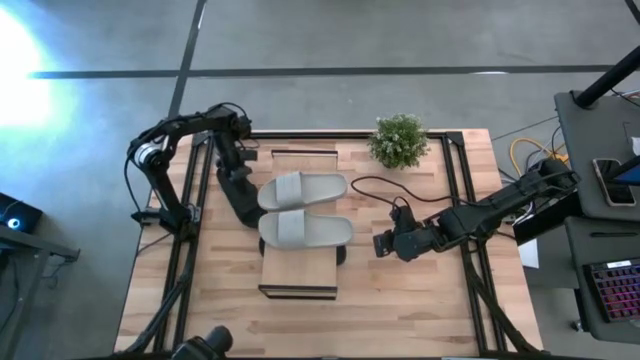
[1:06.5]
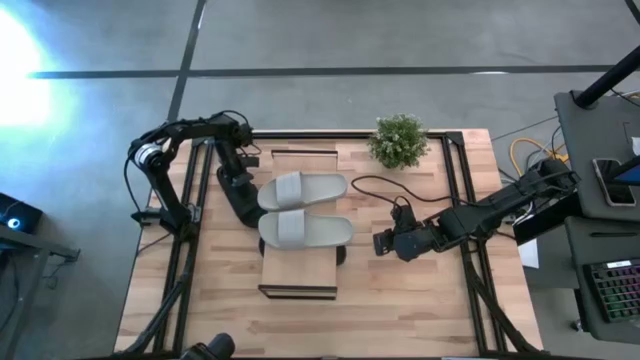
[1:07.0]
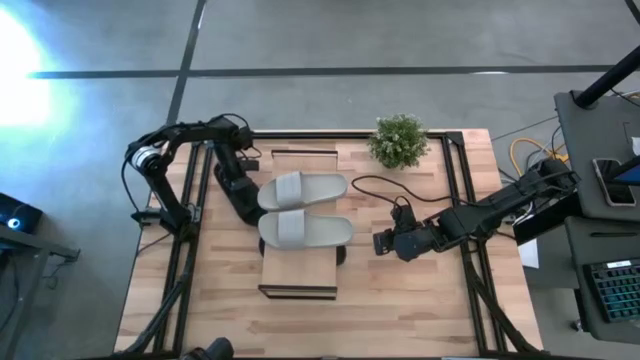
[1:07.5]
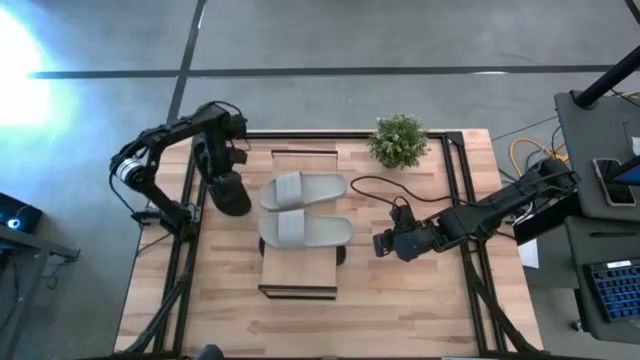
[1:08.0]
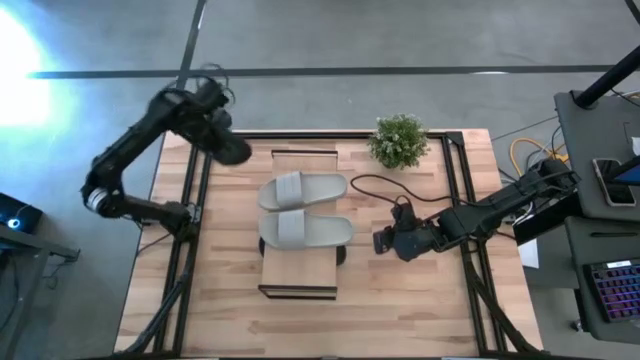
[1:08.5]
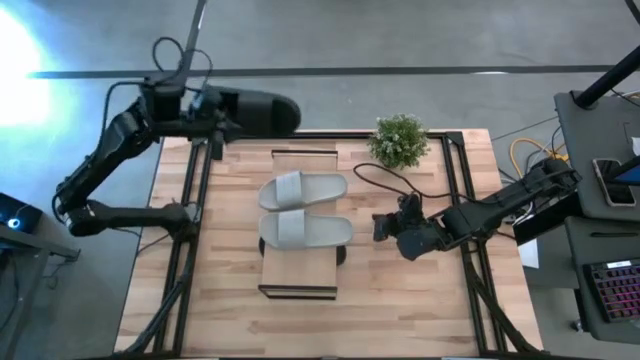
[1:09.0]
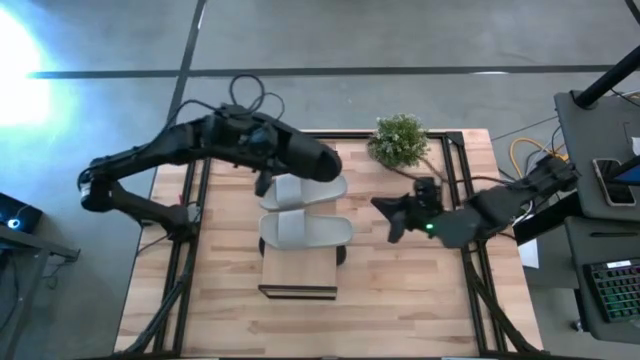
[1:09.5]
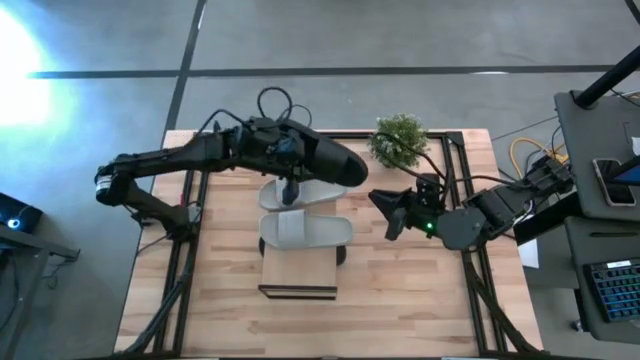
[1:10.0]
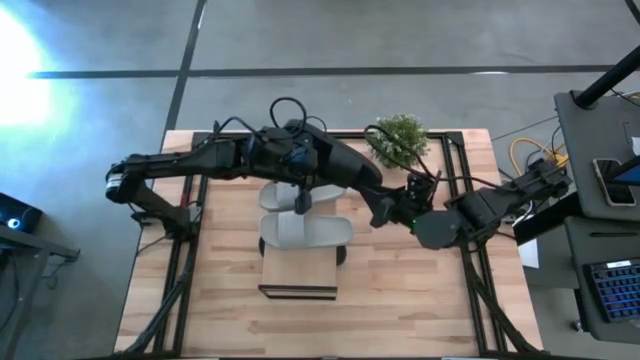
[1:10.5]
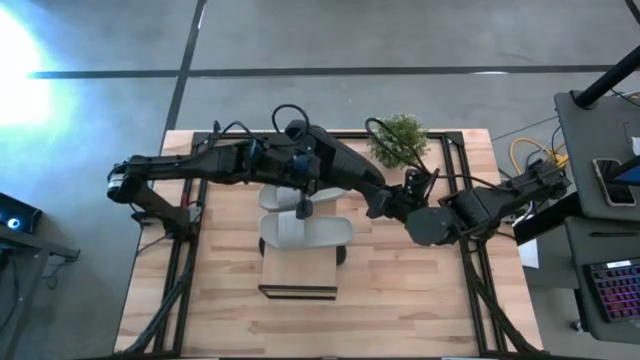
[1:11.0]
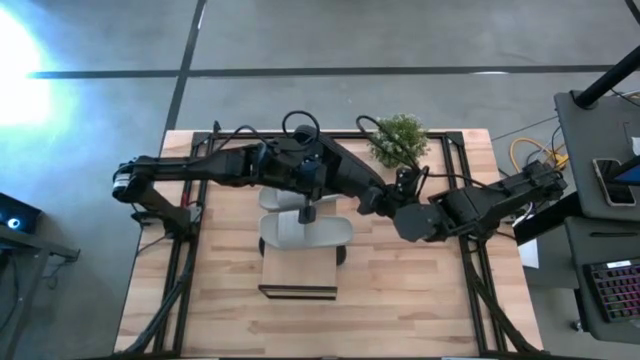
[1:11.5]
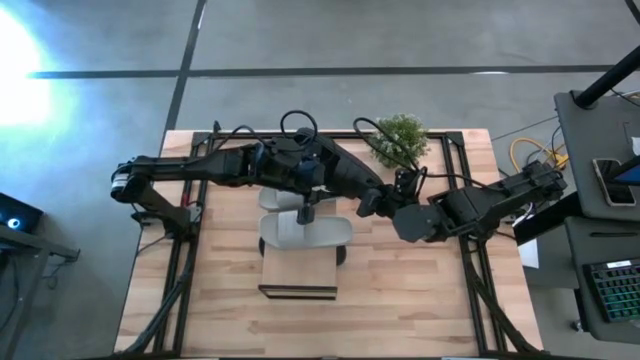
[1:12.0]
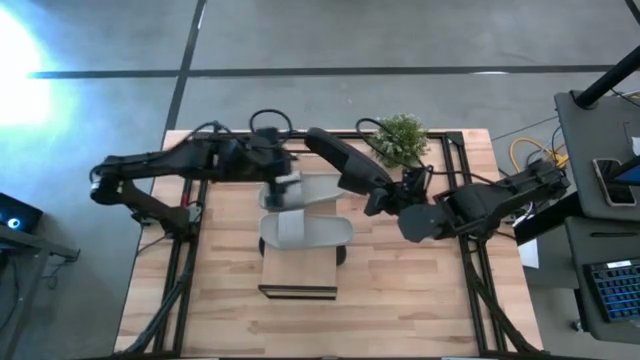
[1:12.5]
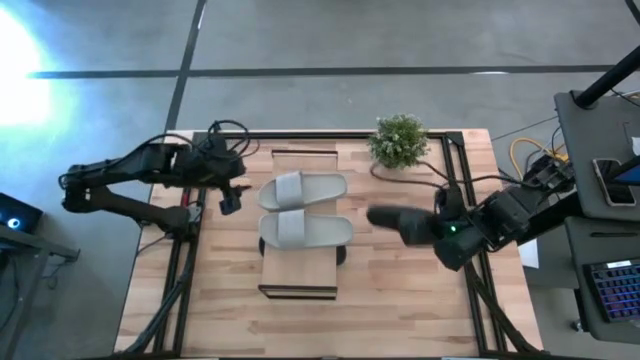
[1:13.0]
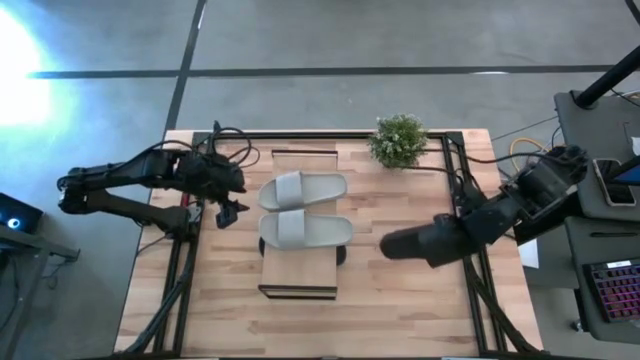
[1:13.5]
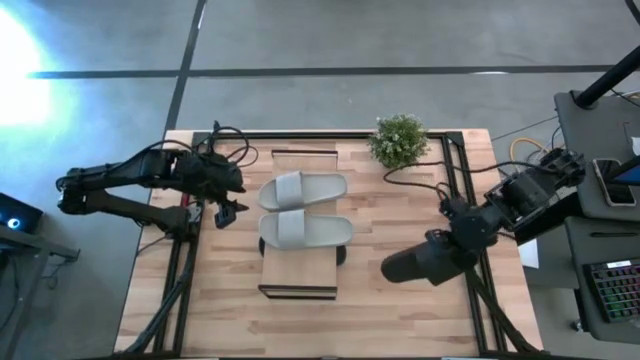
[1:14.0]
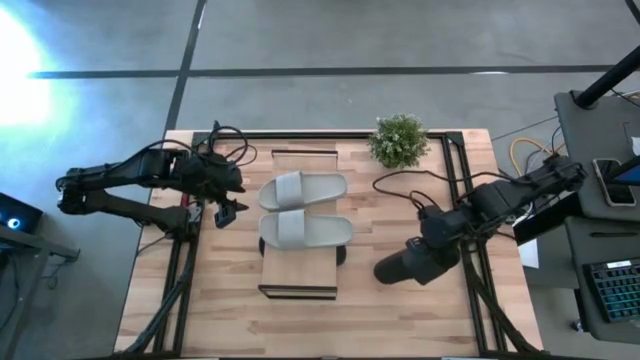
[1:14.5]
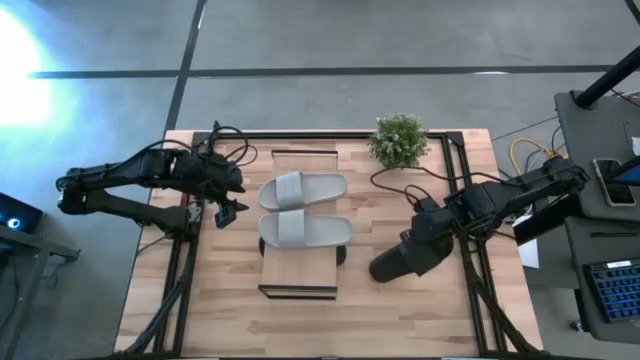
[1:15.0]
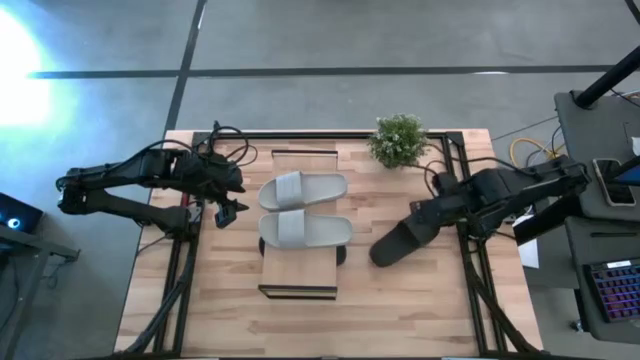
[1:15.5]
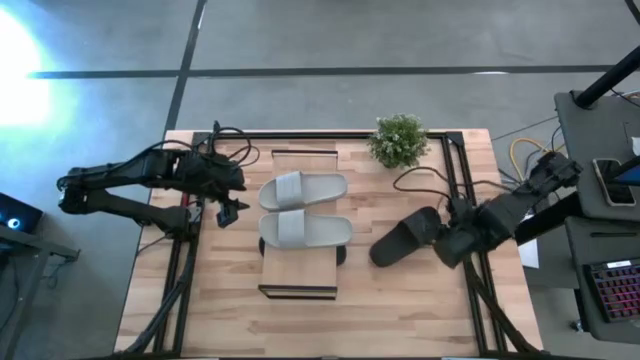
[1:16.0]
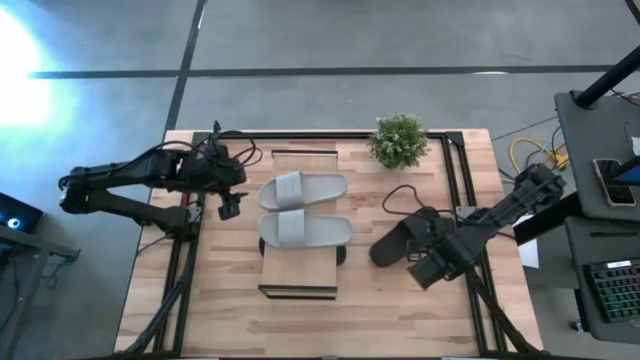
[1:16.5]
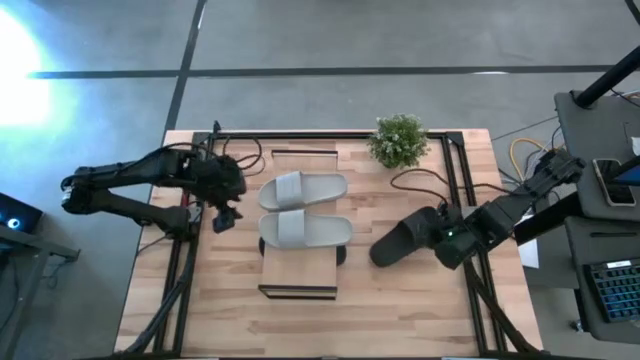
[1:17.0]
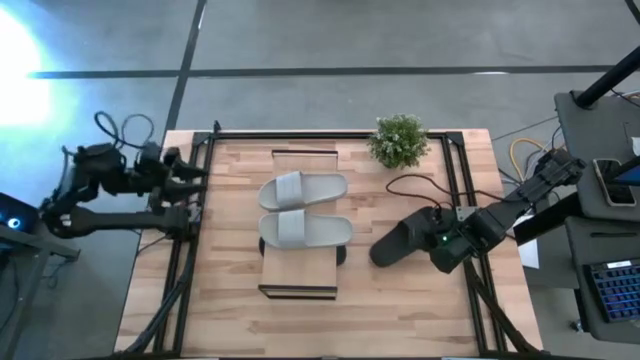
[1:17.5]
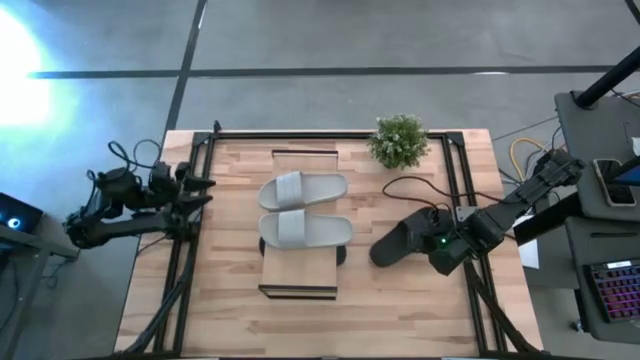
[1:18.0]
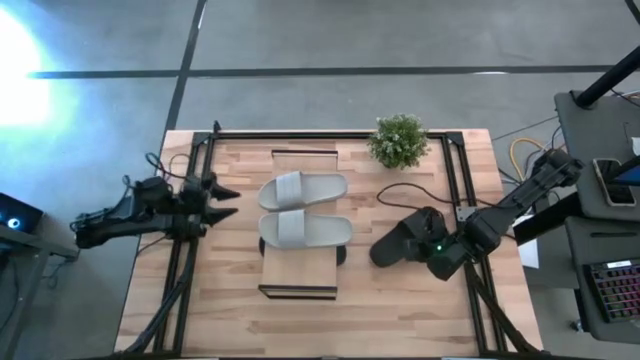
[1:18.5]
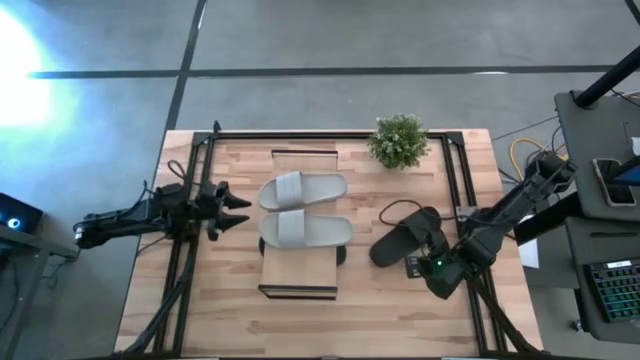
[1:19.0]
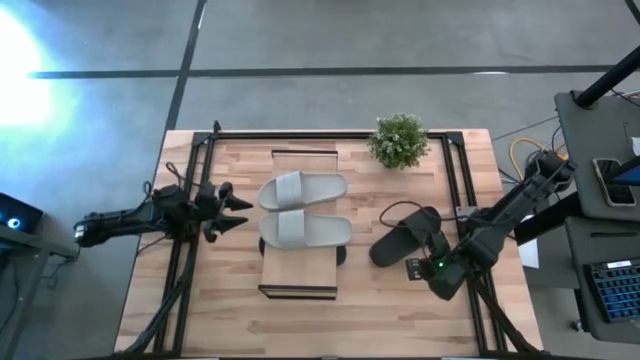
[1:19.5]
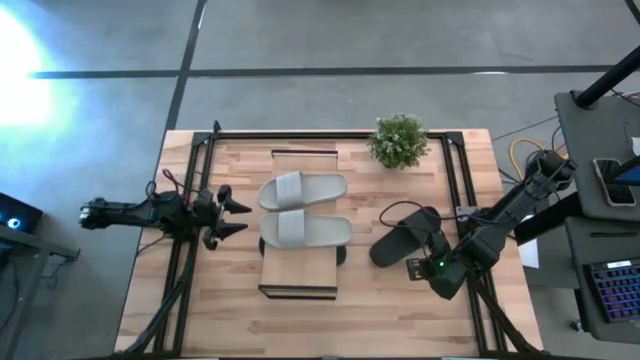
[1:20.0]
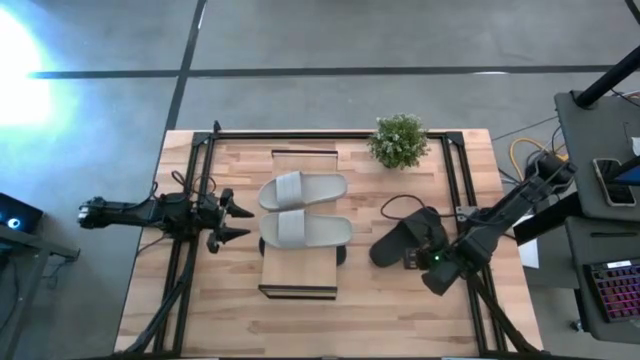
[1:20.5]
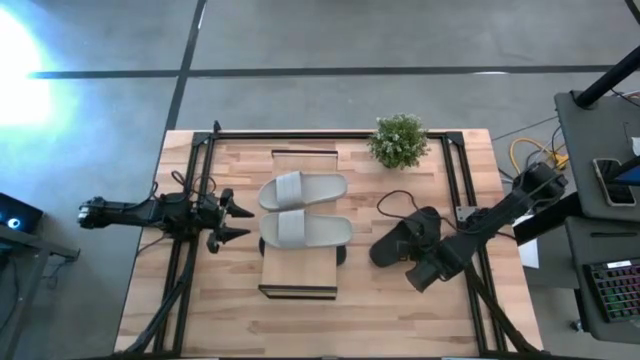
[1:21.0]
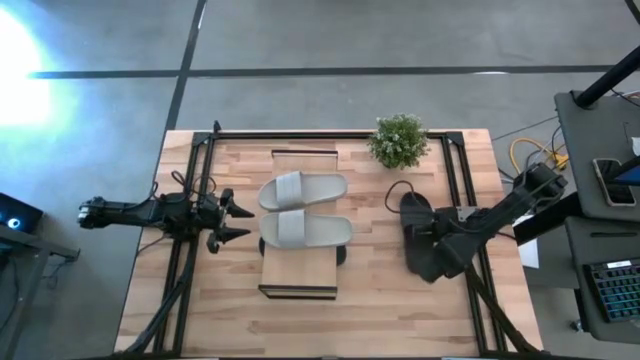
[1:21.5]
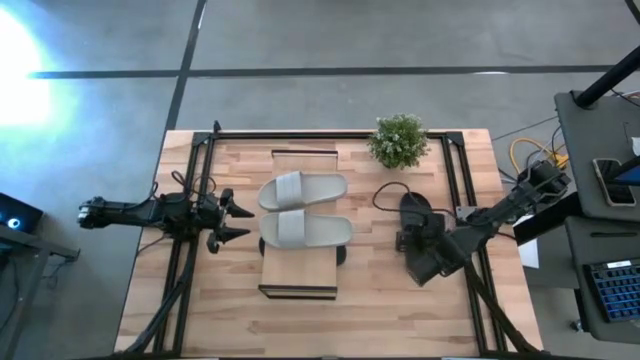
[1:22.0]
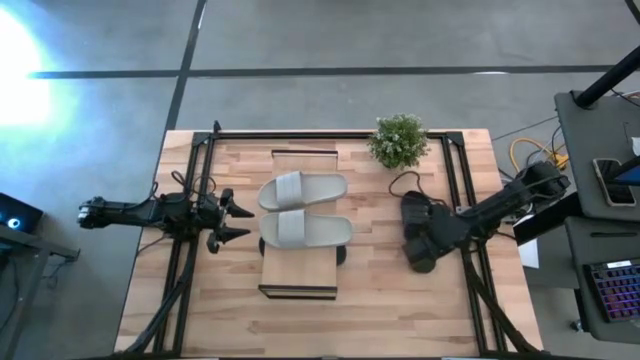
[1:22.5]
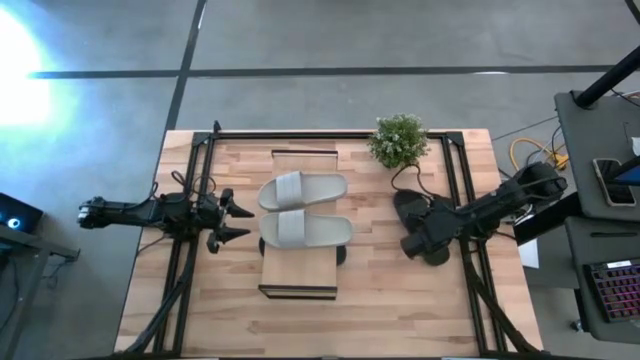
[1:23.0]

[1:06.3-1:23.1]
Task: Pick and place slides into the shelf
Move the black slide under the shelf
